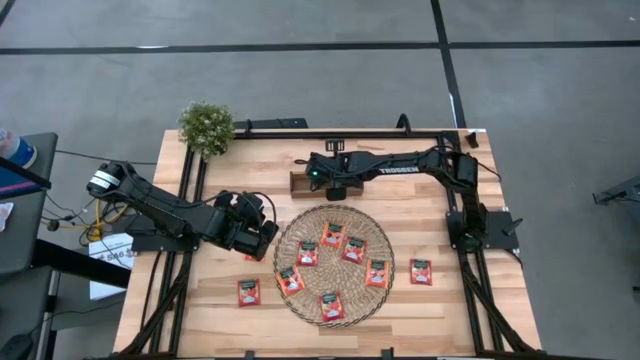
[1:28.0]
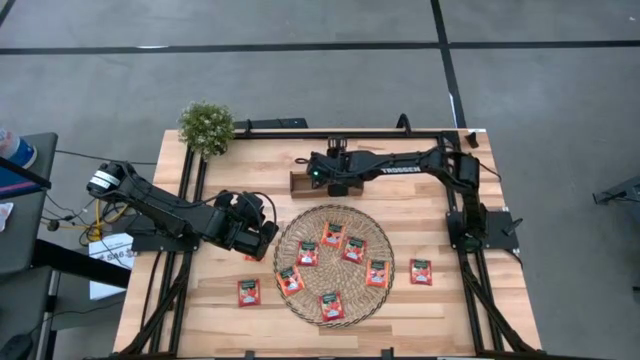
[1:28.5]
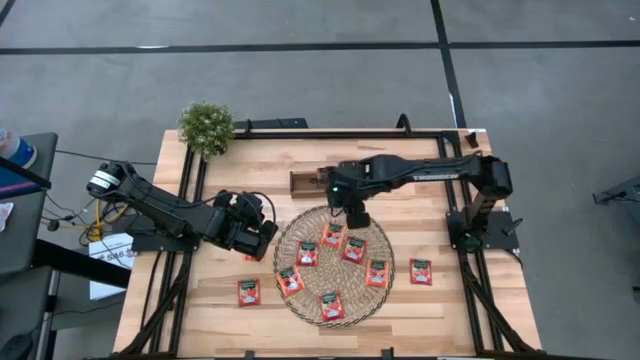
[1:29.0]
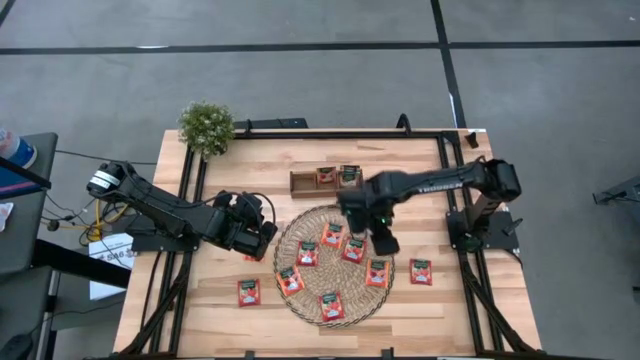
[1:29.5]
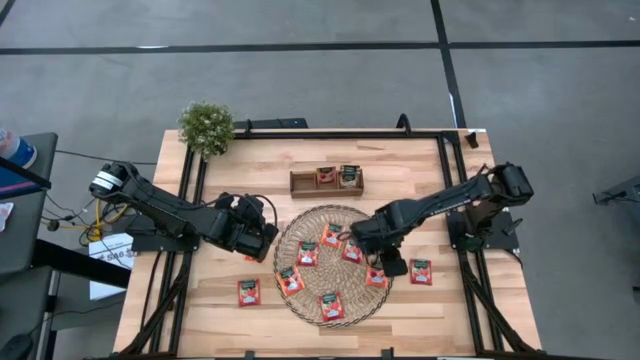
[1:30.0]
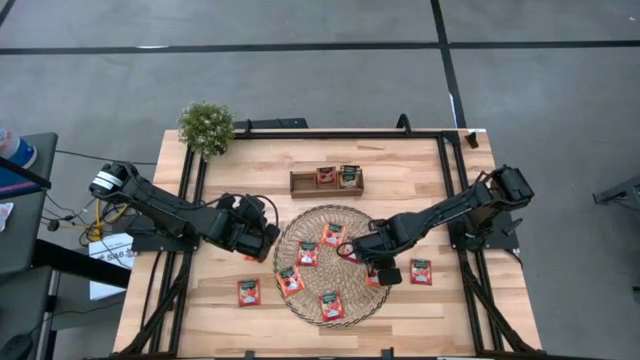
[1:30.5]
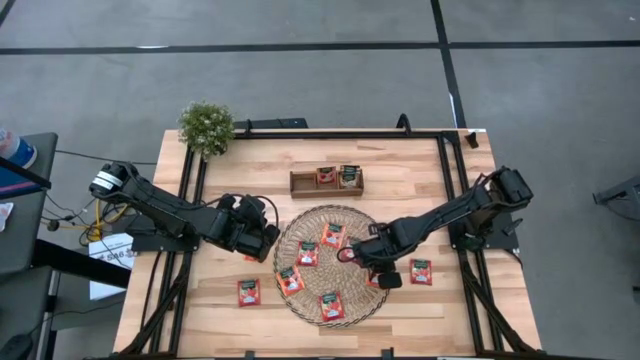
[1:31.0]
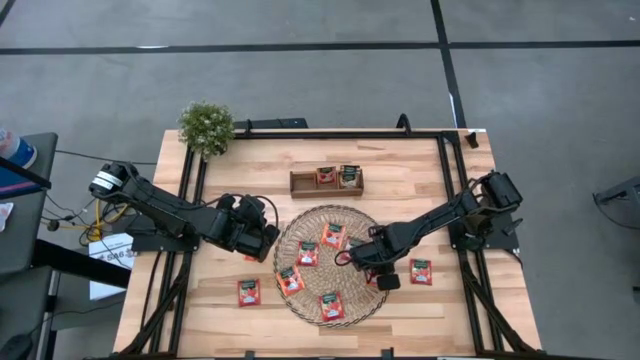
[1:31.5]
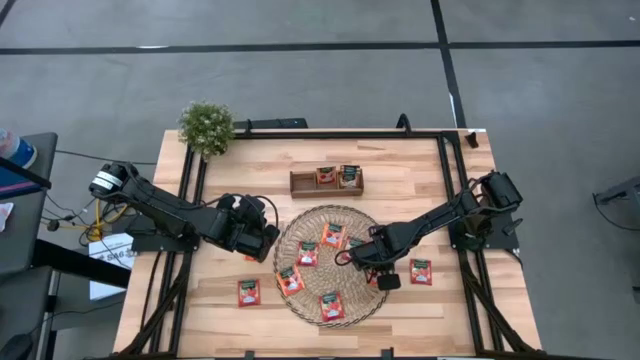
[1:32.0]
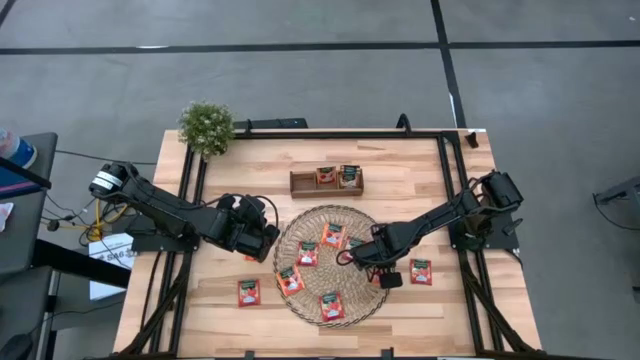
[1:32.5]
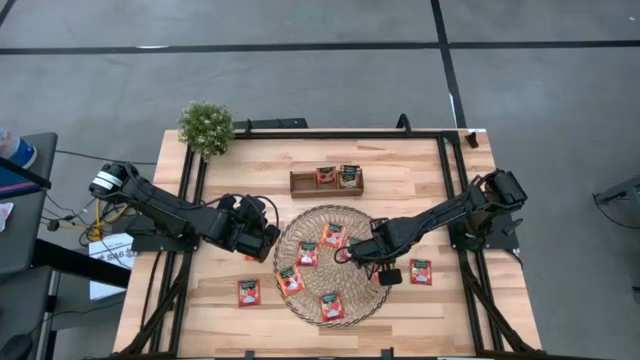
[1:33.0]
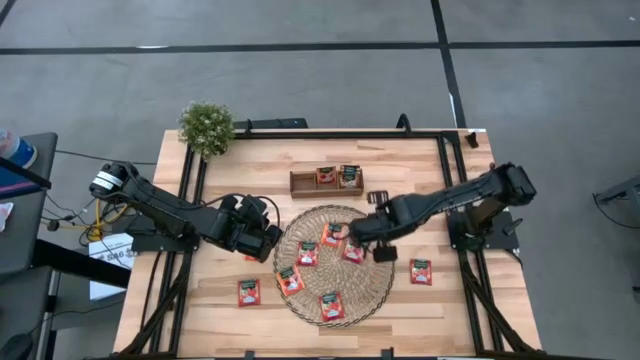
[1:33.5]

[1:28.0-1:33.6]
Task: Pick & Place Tea
Put the orange tea bag into the wooden organizer

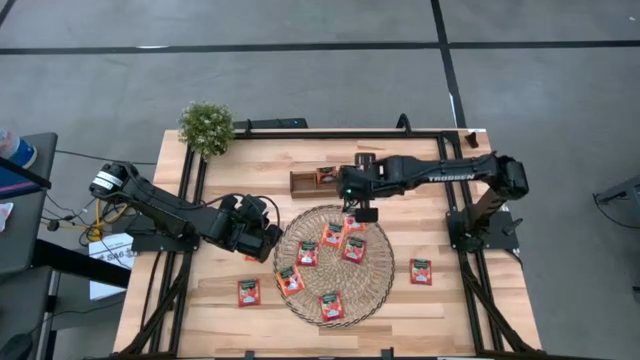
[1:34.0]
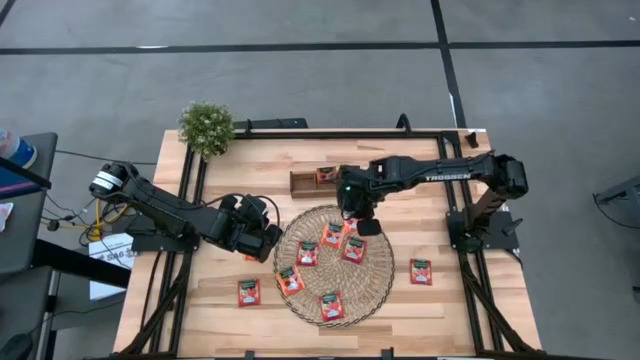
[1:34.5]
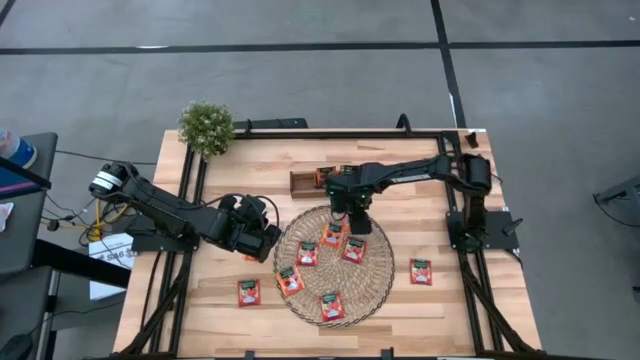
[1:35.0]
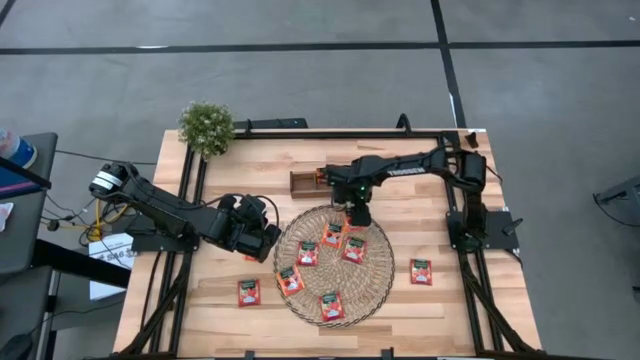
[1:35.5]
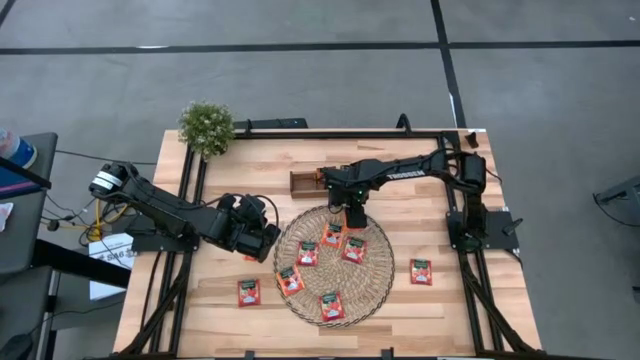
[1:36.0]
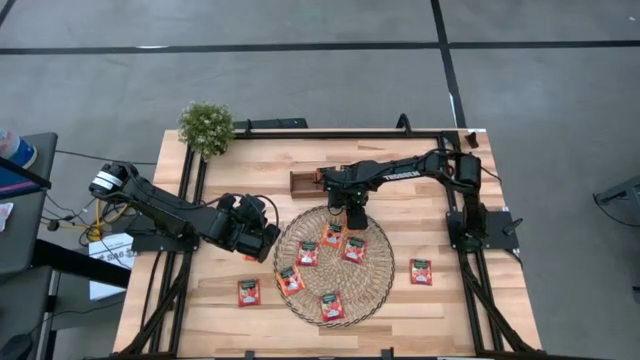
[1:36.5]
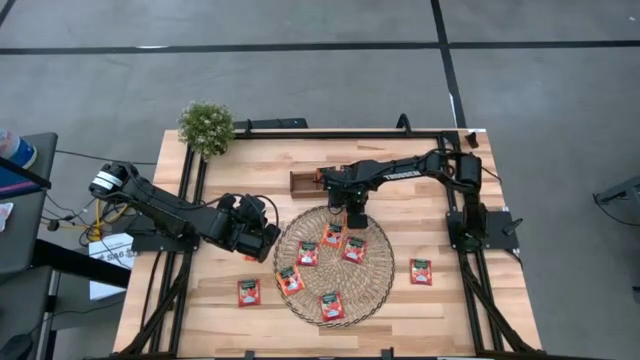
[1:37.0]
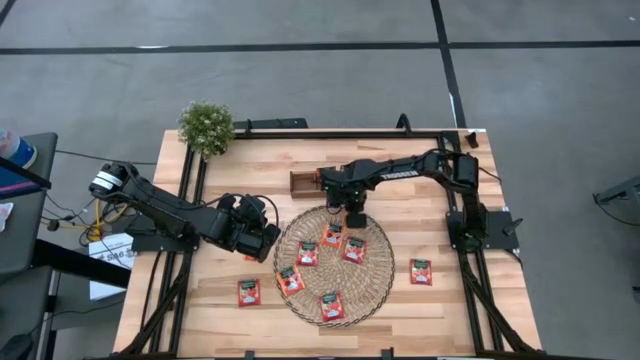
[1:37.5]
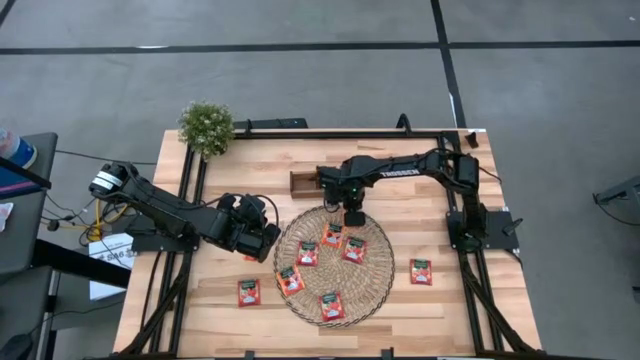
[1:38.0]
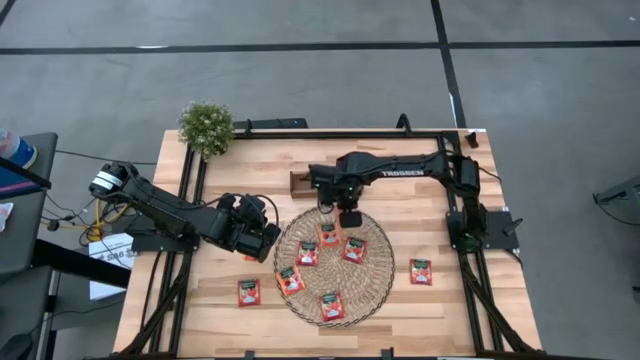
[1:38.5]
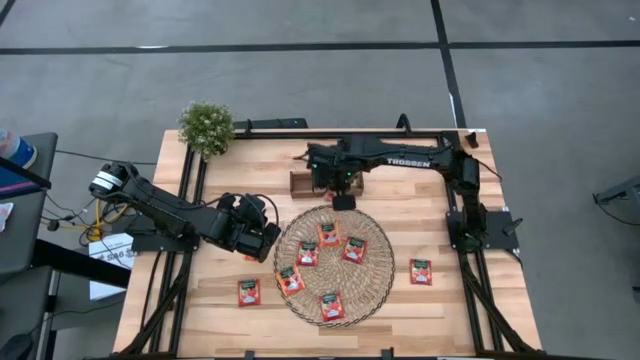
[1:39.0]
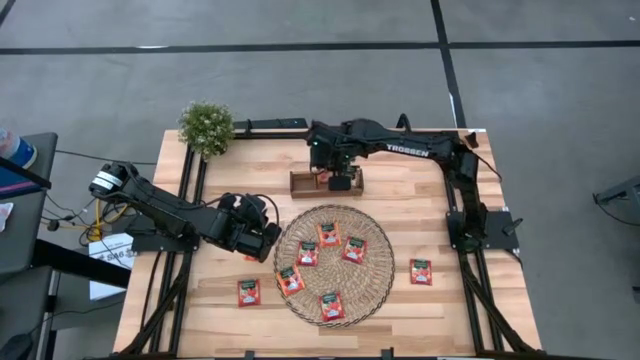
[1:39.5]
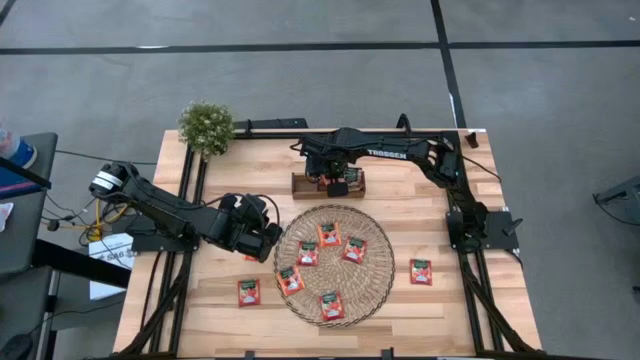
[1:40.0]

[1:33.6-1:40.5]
Put the orange tea bag into the wooden organizer

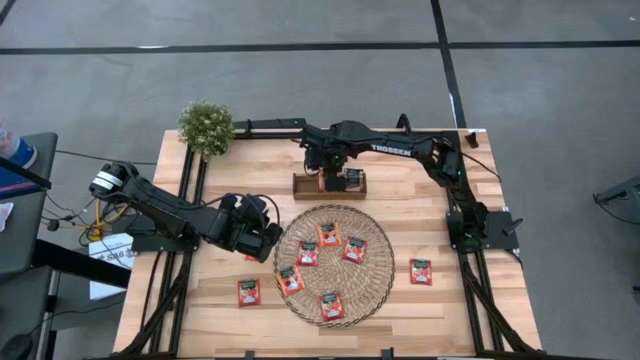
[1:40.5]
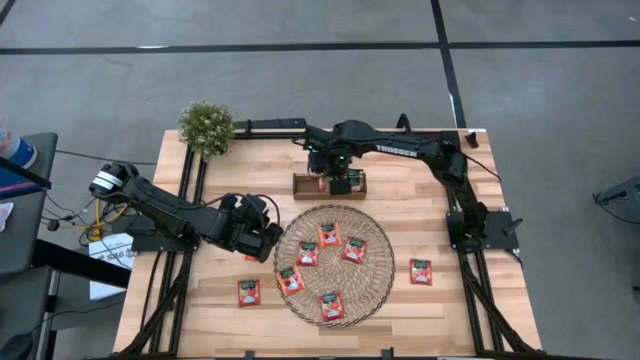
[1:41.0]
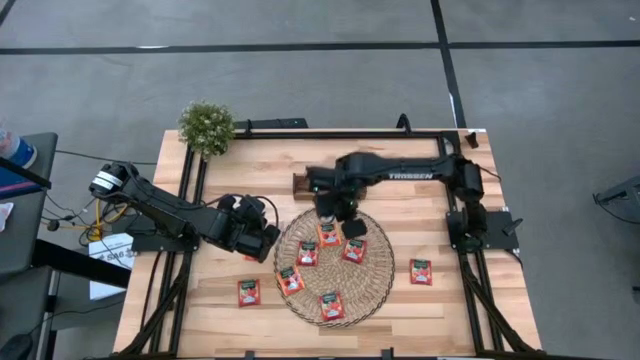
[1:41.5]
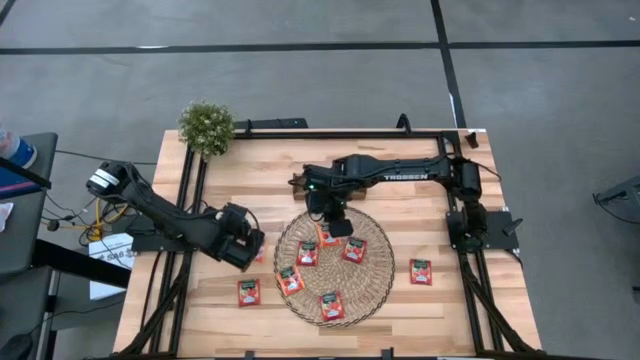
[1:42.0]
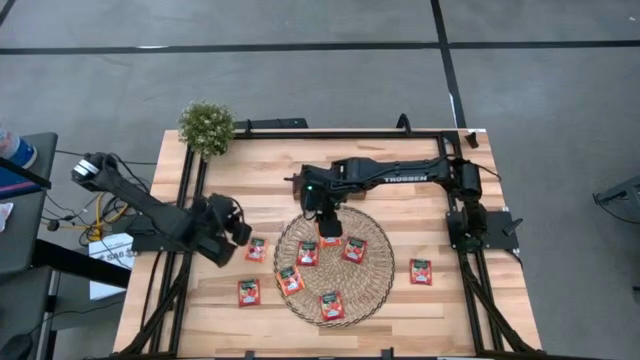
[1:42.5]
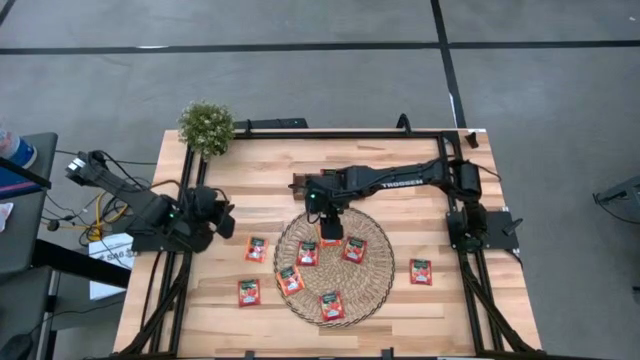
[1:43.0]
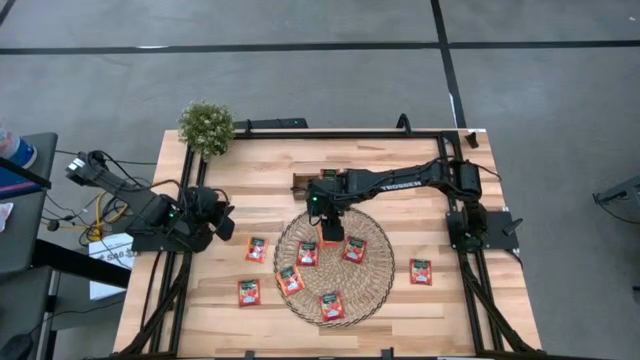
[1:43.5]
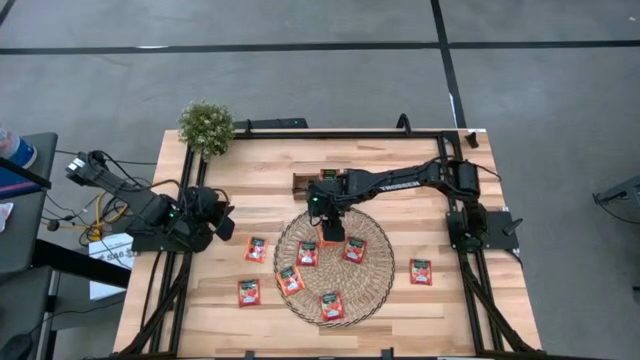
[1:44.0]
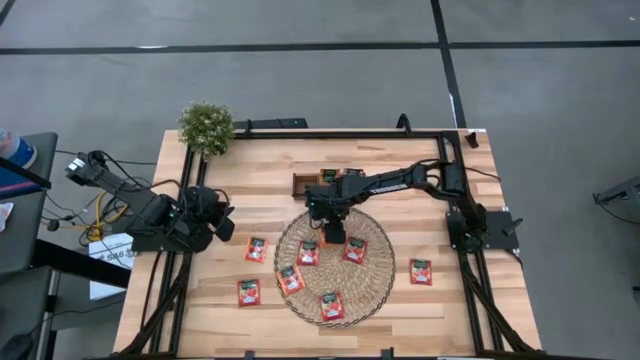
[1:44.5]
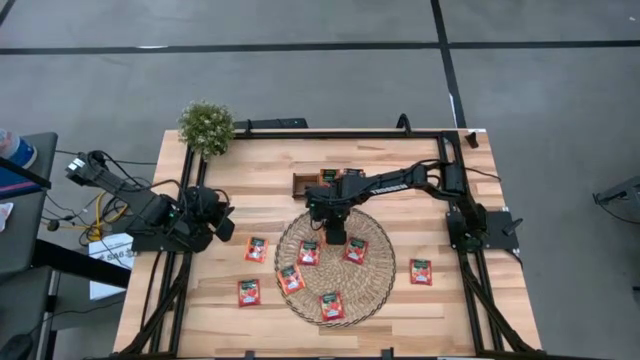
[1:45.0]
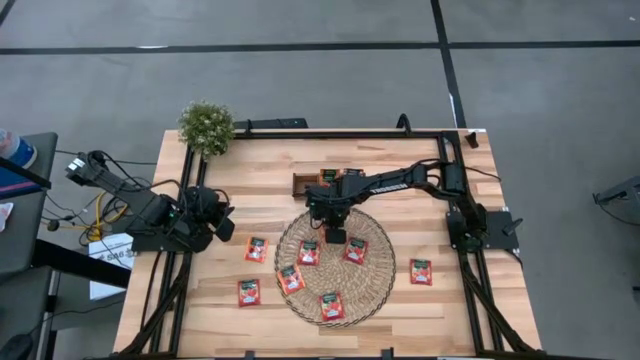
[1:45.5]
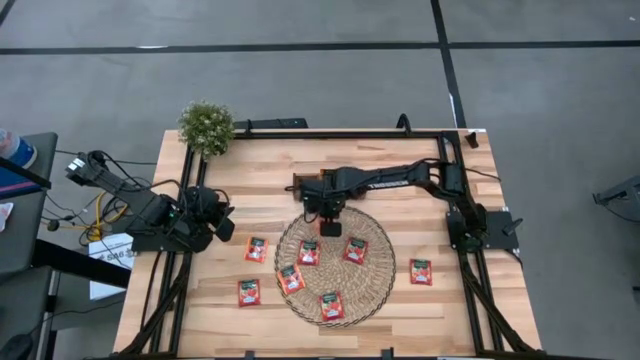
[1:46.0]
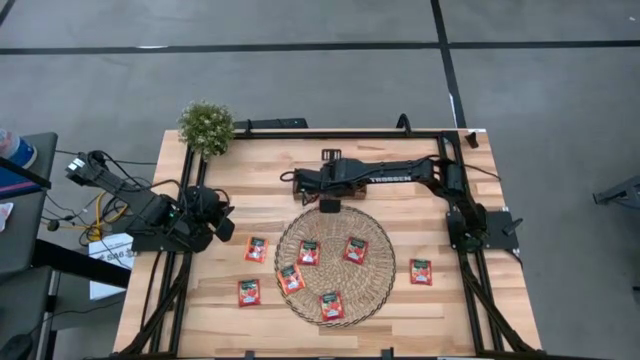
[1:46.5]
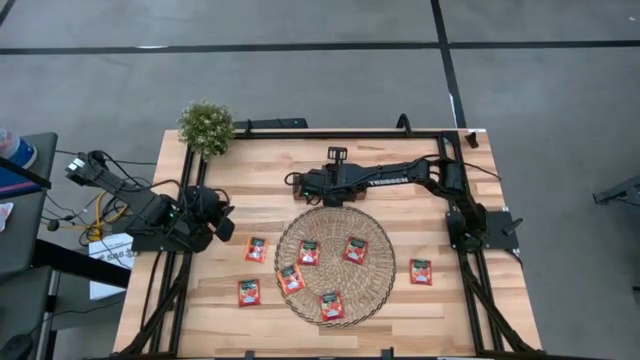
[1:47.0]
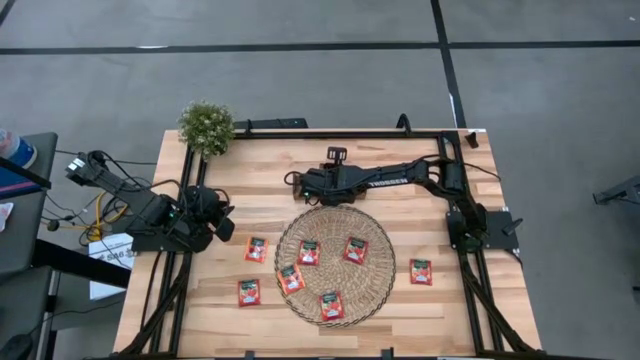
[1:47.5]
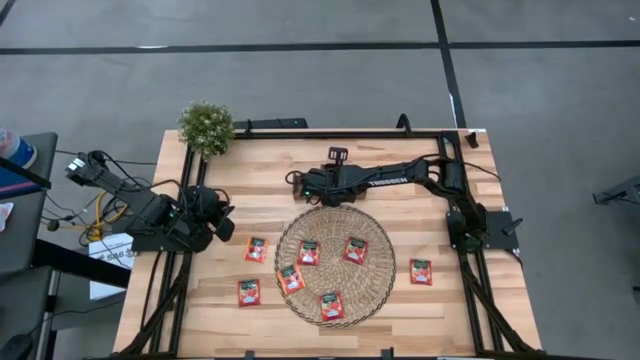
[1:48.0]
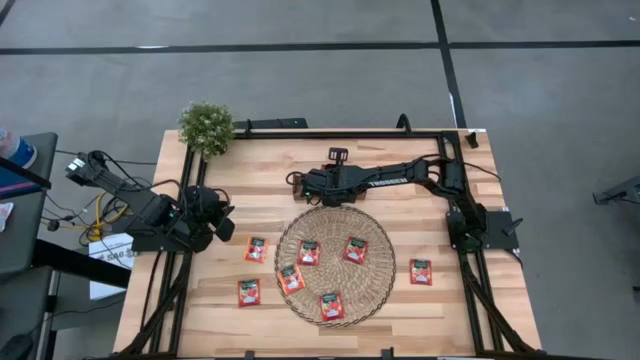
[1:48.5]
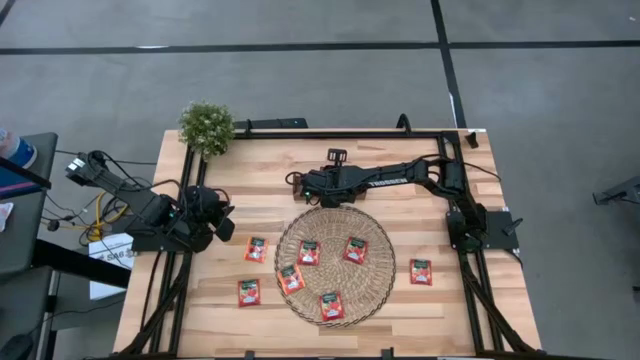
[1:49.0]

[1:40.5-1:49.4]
Put the orange tea bag into the wooden organizer

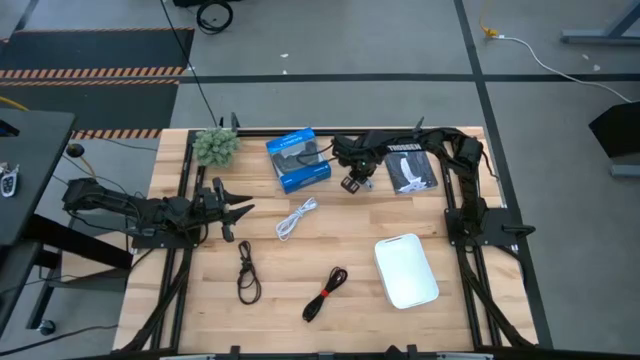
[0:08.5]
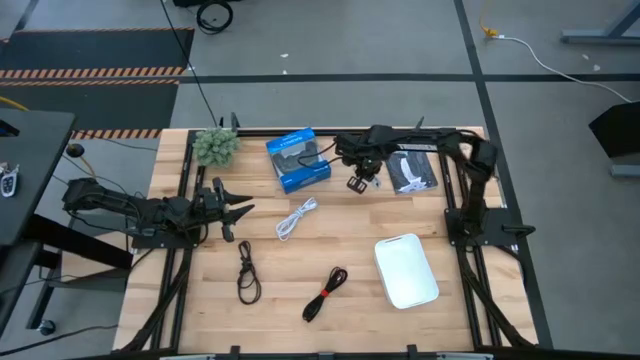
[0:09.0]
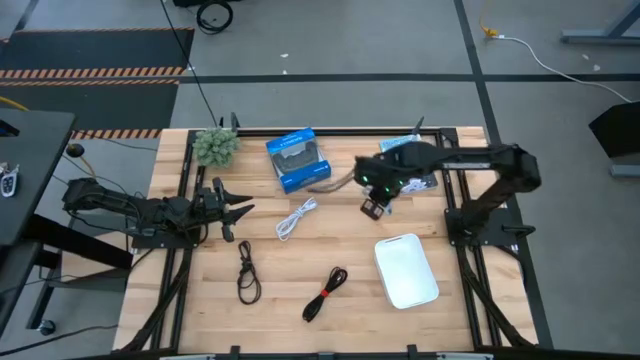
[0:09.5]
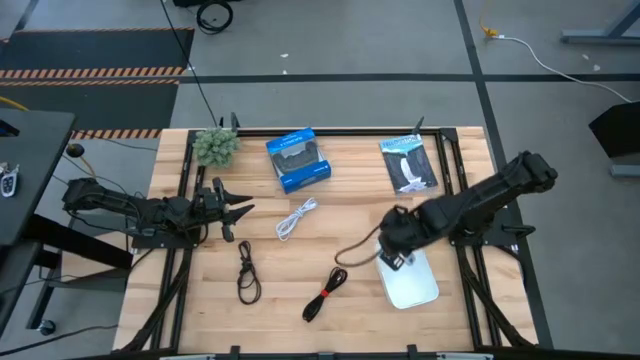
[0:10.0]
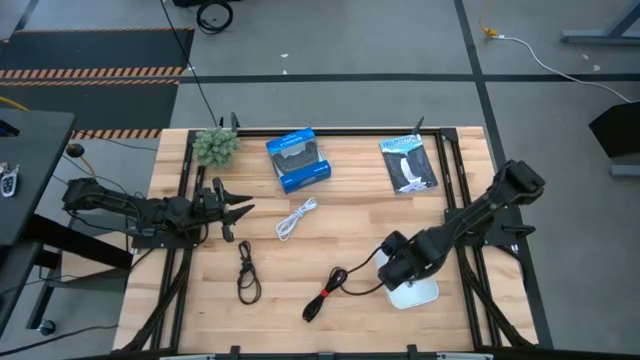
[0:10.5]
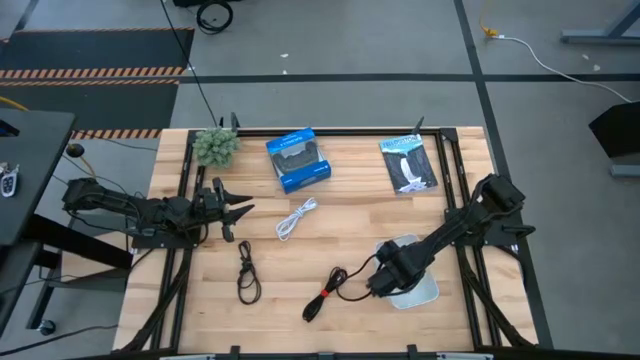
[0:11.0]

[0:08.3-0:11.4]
Task: Pick and place USB-C Cables
Put the top light blue charger cable into the white bin
